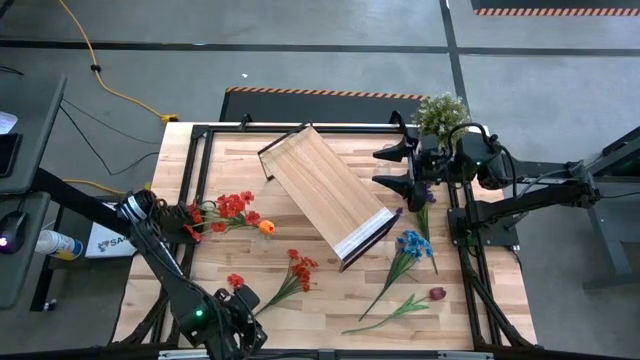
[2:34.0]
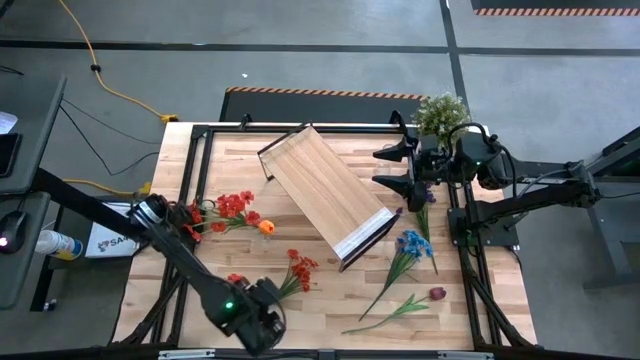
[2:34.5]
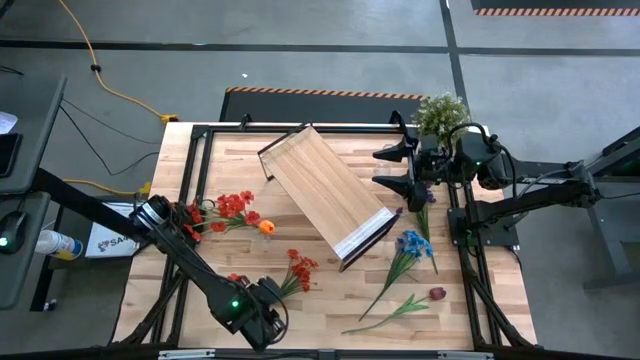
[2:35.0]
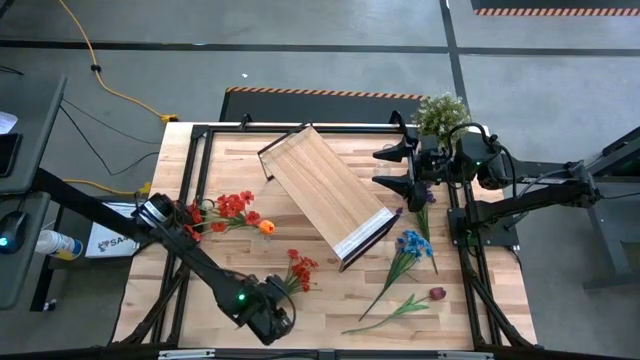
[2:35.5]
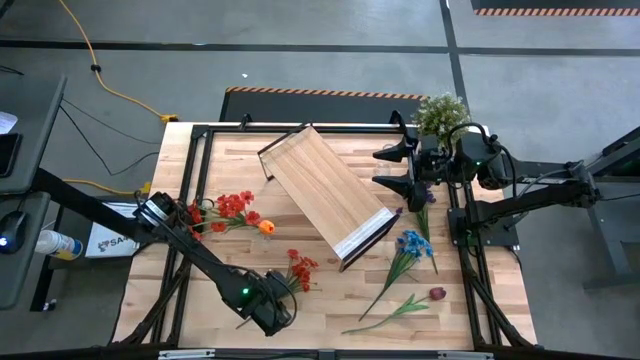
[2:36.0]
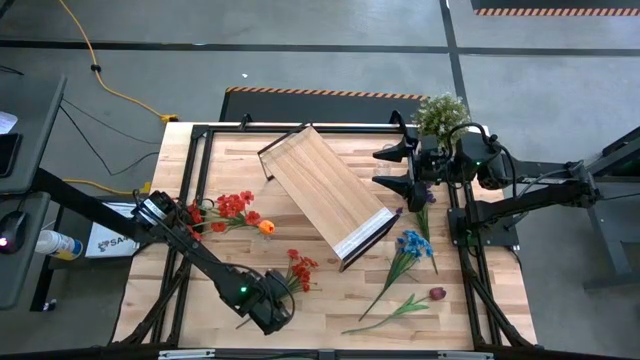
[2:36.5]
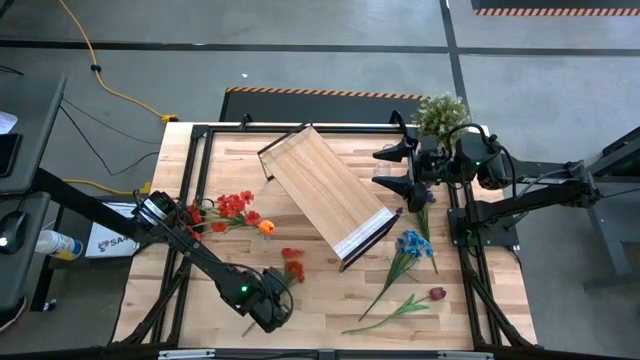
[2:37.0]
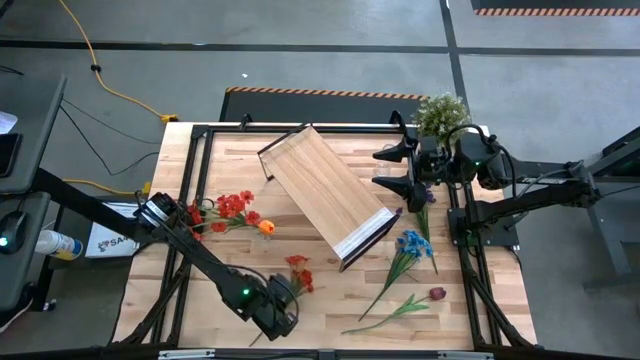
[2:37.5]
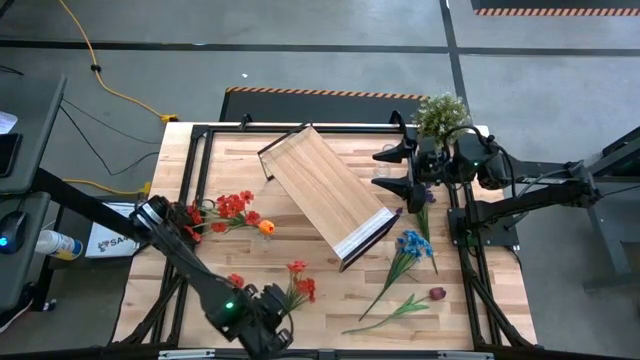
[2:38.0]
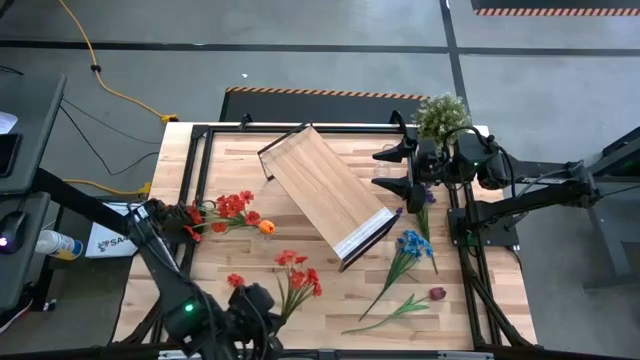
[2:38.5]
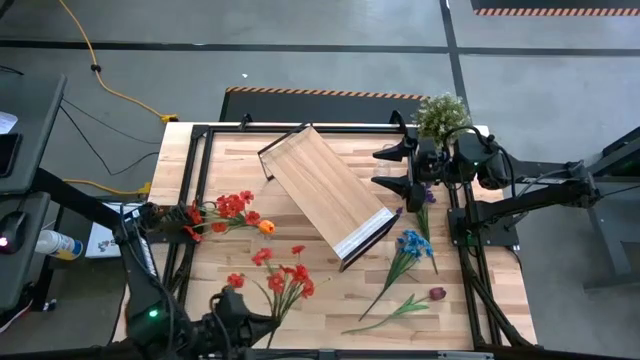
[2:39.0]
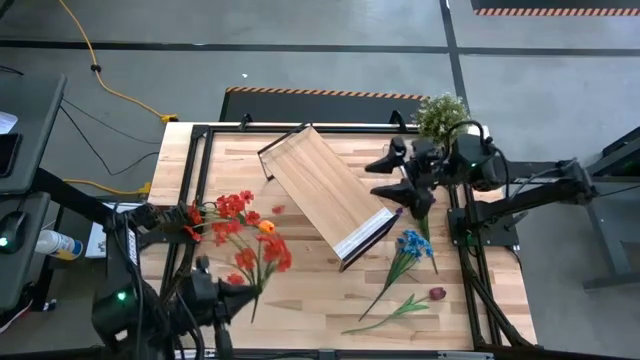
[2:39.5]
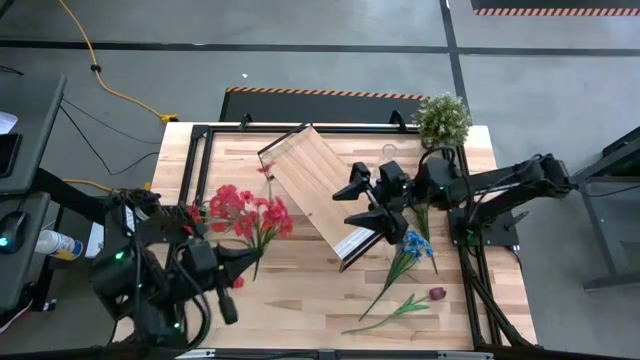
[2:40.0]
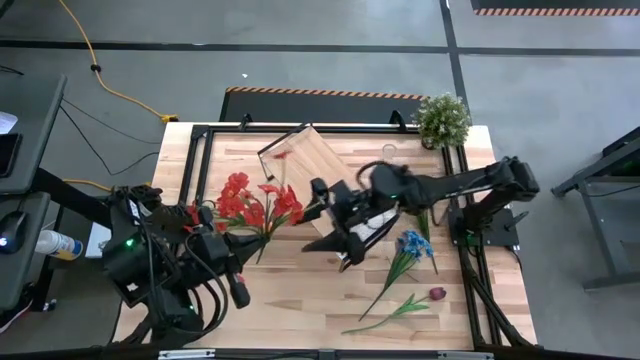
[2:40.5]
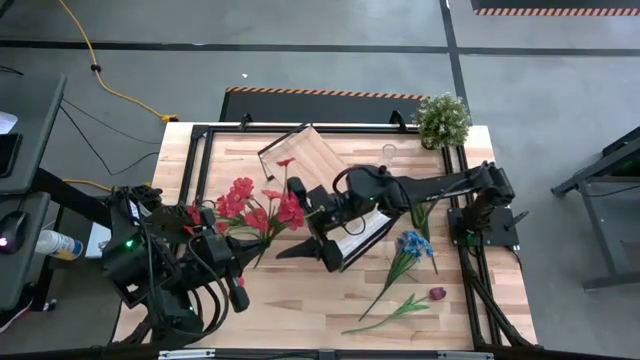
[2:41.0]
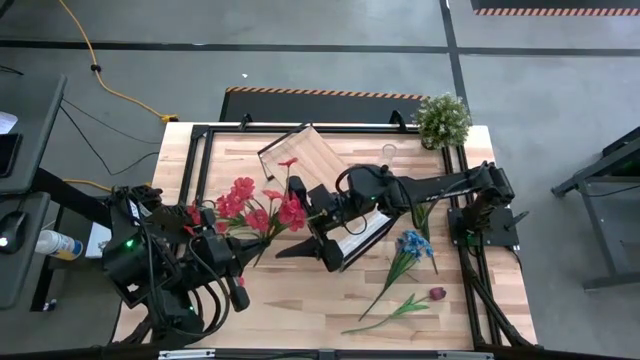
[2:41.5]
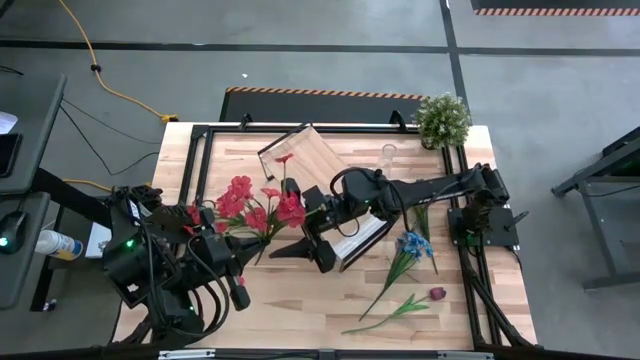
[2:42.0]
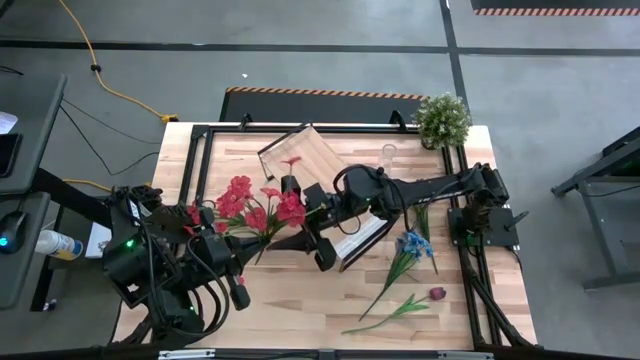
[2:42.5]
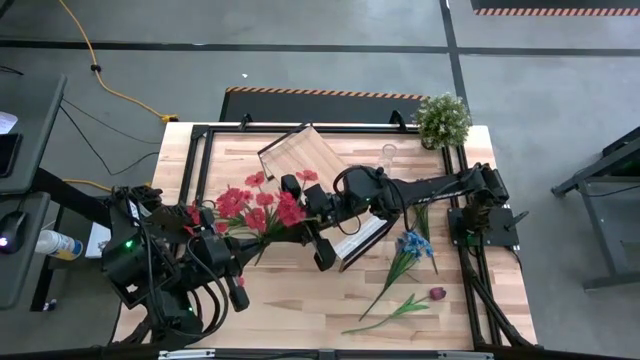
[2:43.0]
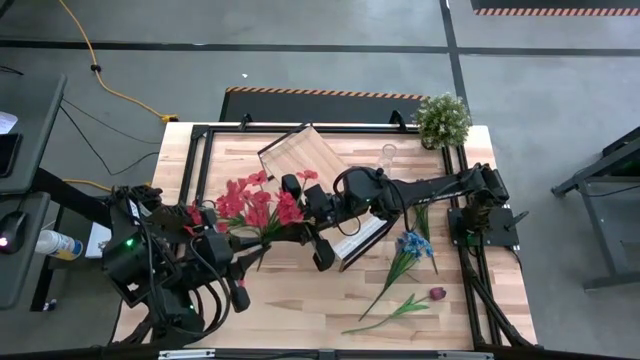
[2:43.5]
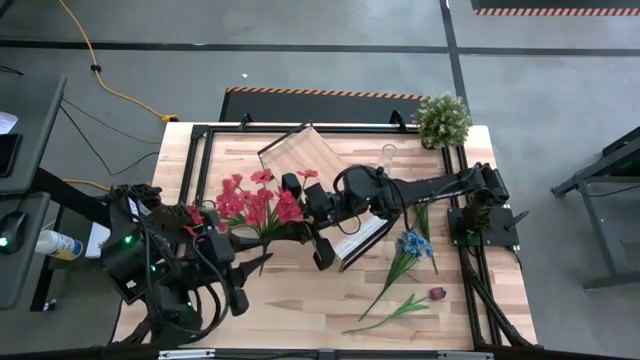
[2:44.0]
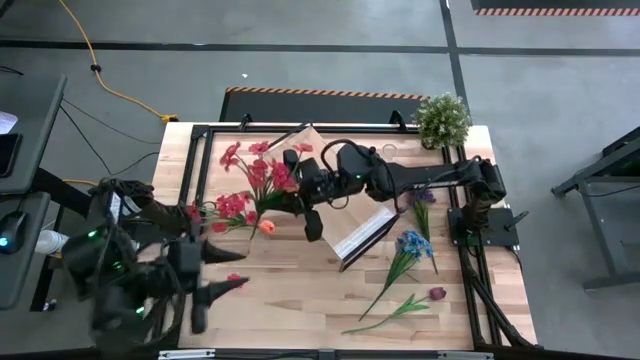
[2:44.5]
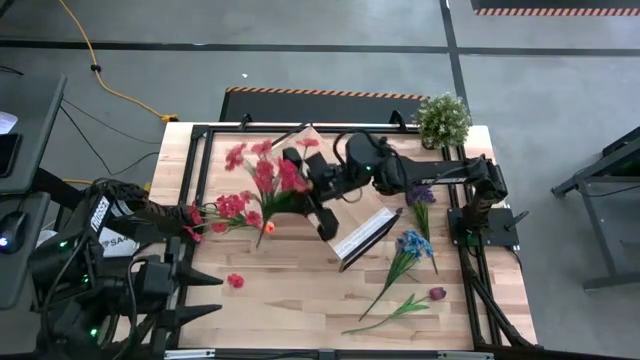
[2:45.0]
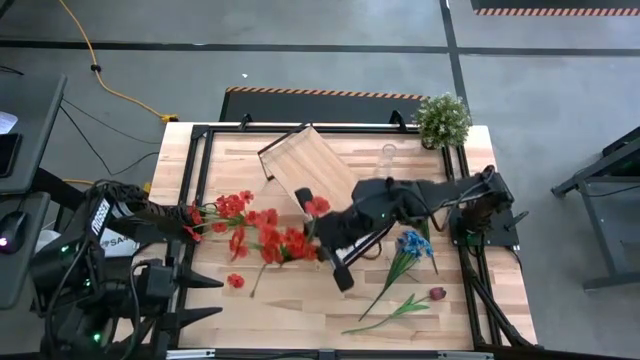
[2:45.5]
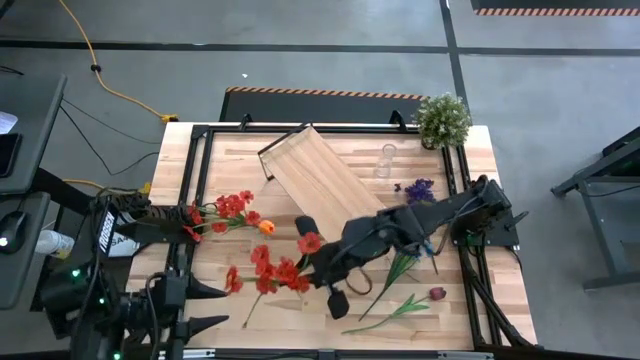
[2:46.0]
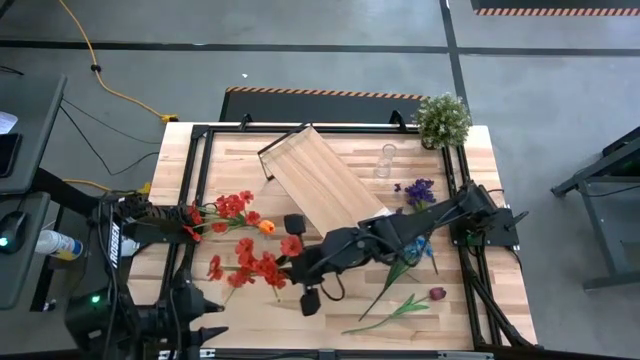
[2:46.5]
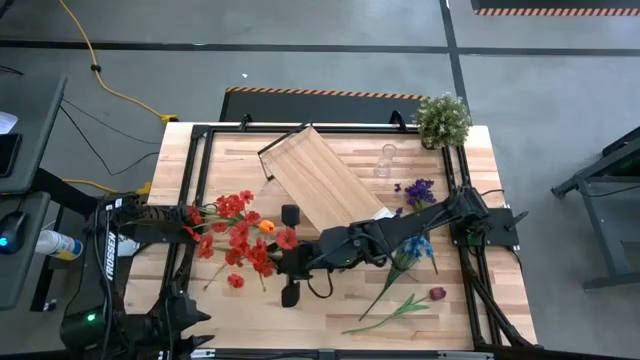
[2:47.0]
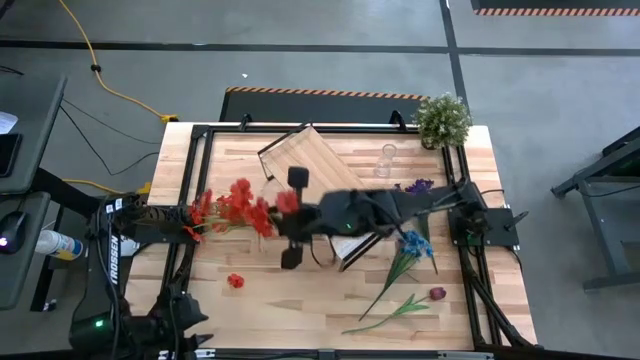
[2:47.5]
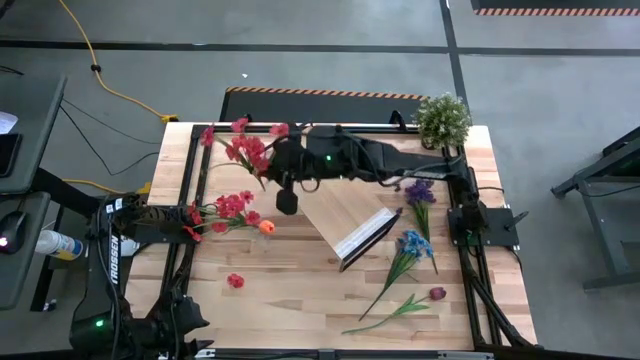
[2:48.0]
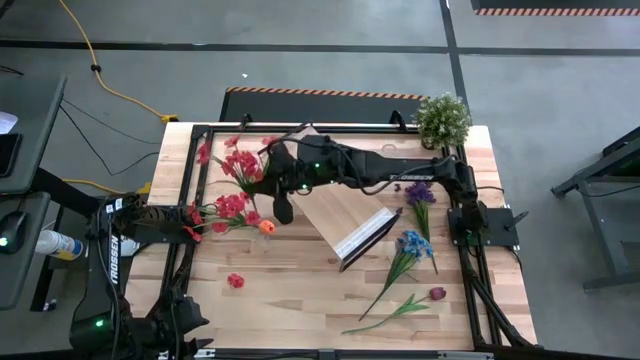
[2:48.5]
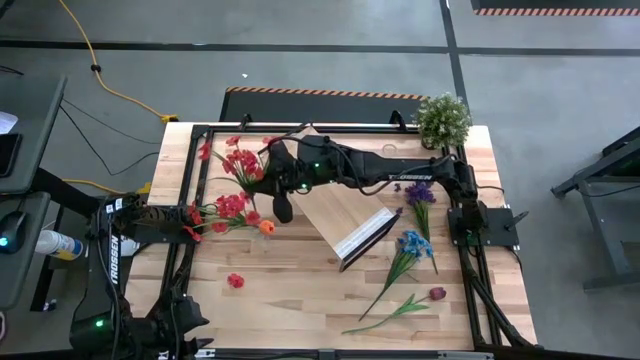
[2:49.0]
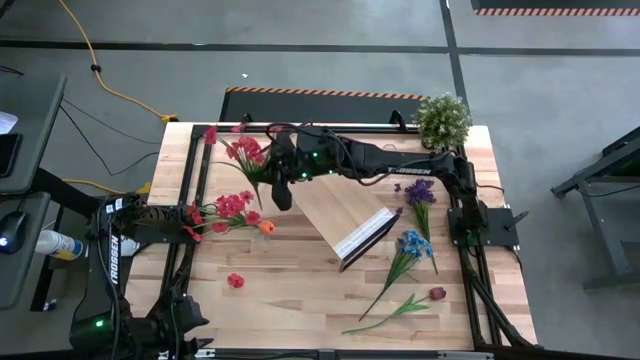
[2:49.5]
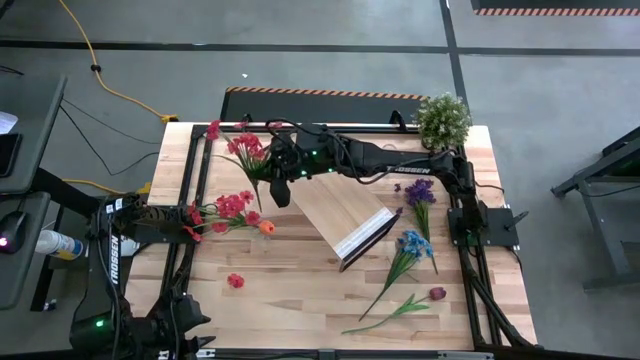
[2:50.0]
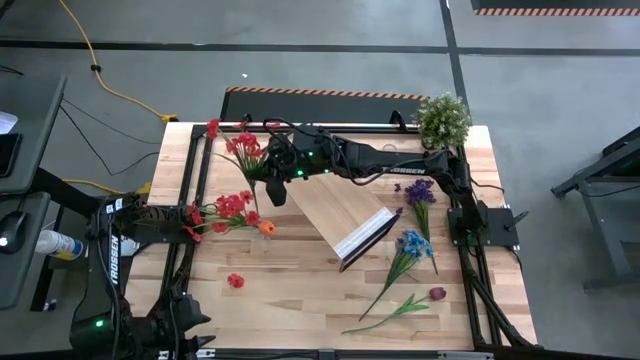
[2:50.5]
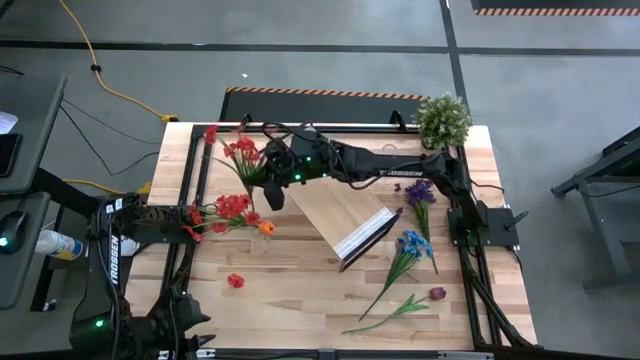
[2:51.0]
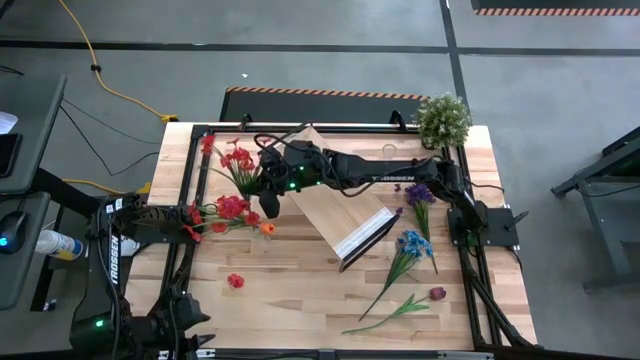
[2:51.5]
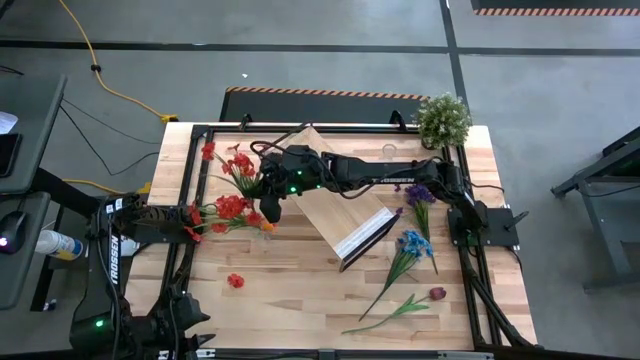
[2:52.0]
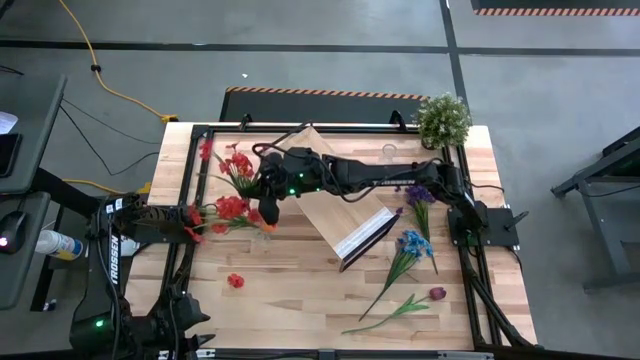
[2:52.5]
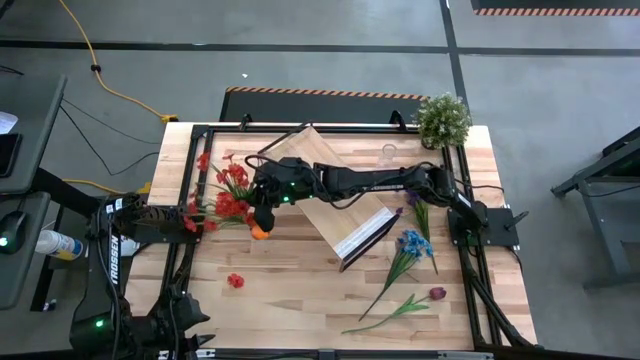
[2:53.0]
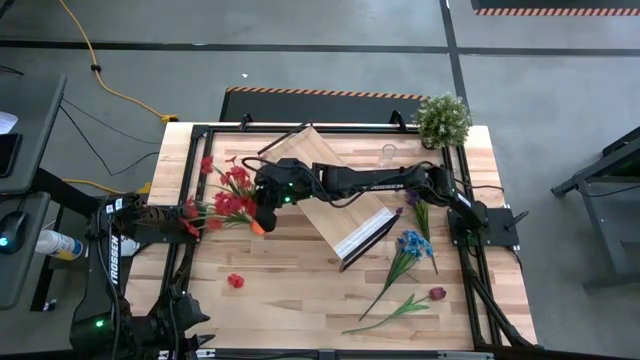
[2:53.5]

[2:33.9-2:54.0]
Task: Pick and place flowers into a vace then onto a shelf
Put the red flowers into the bottom transparent vase

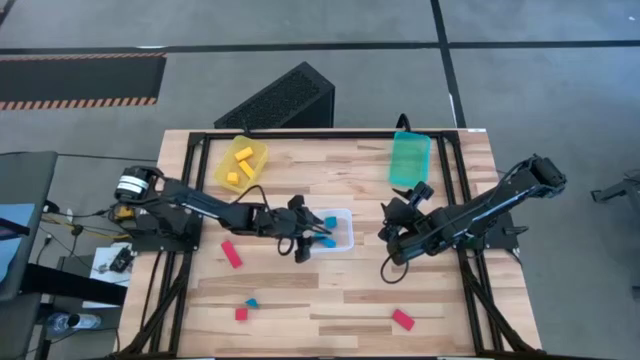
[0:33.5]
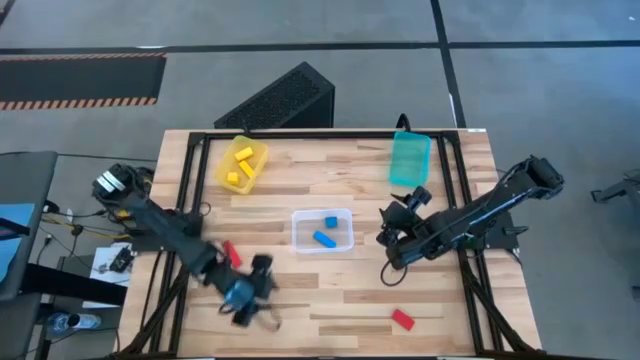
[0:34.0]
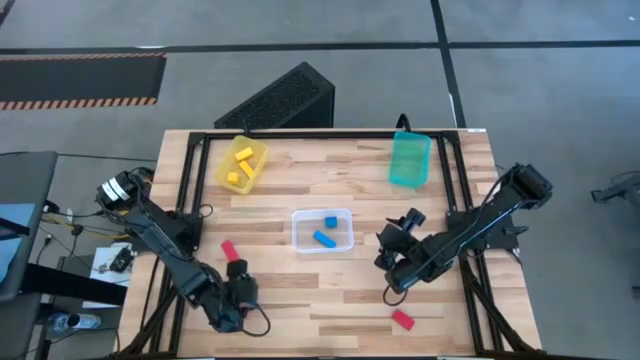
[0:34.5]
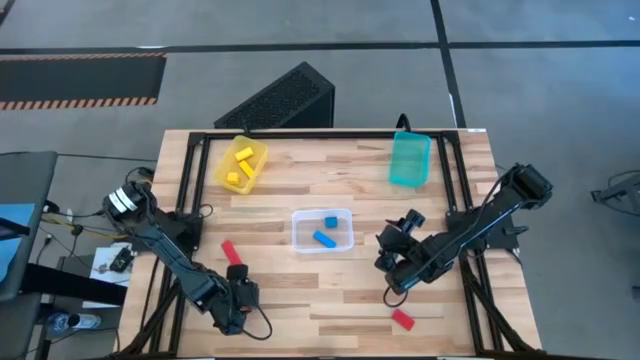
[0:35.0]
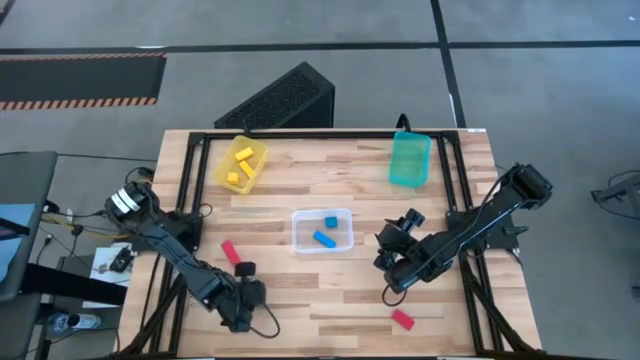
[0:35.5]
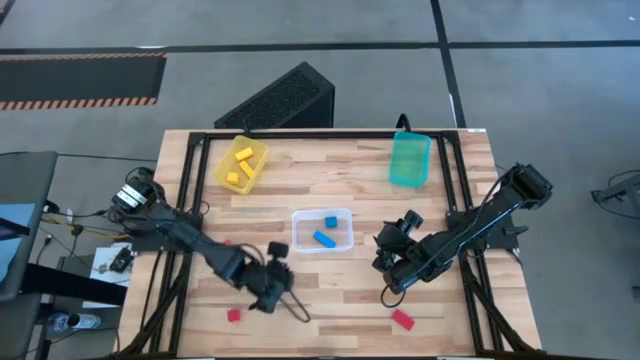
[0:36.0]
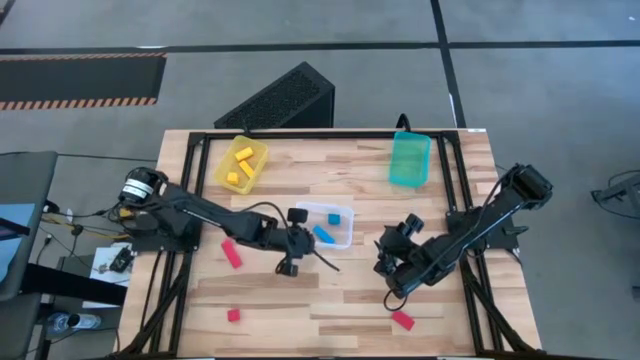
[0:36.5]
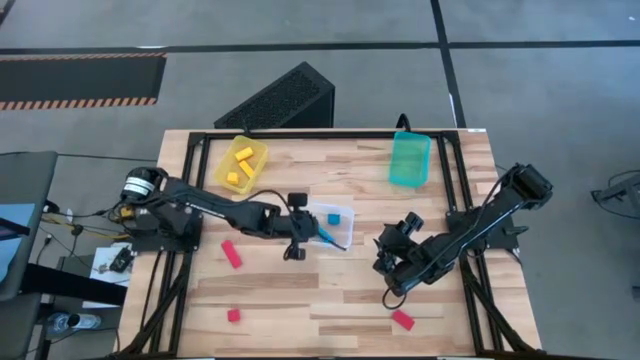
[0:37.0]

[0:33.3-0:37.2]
Task: Sort & place blocks by color
Put the blue block into the transparent bin
